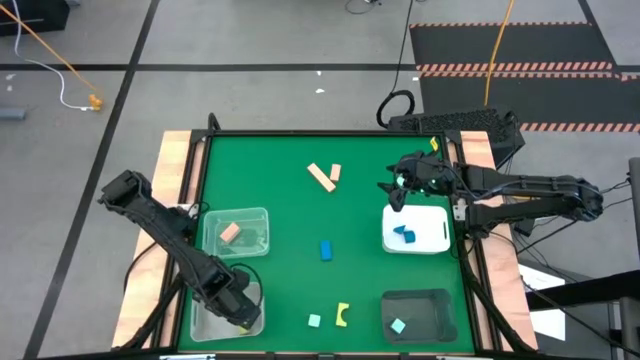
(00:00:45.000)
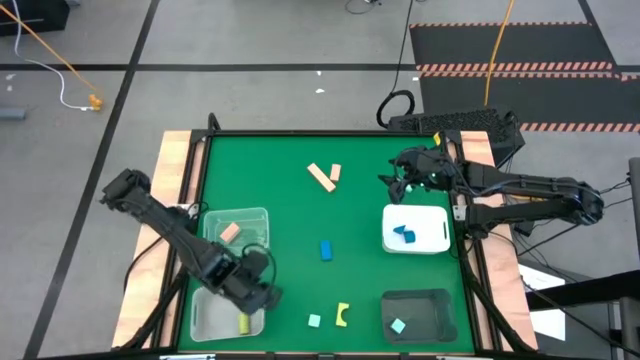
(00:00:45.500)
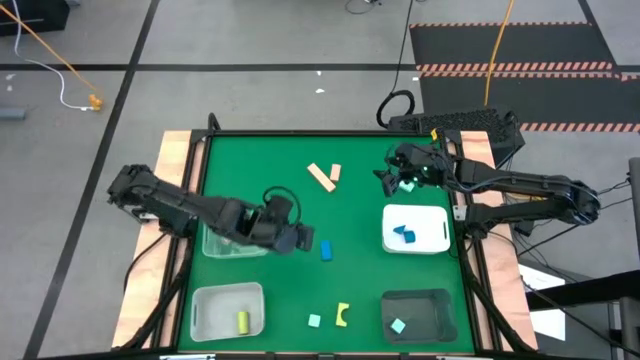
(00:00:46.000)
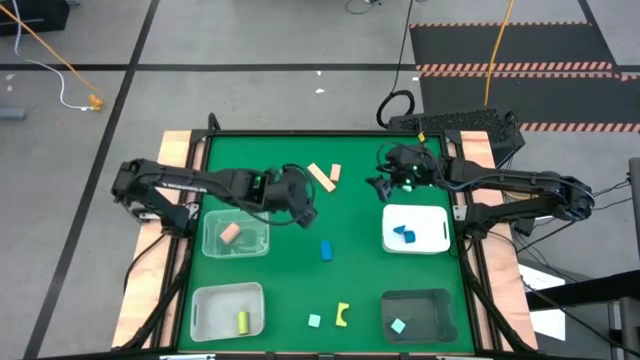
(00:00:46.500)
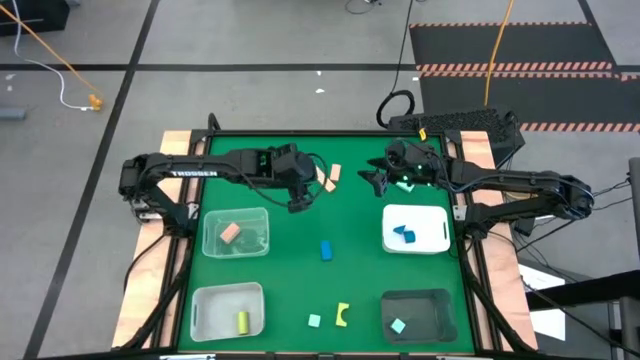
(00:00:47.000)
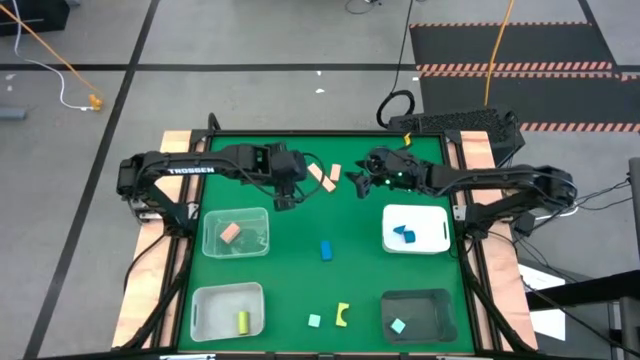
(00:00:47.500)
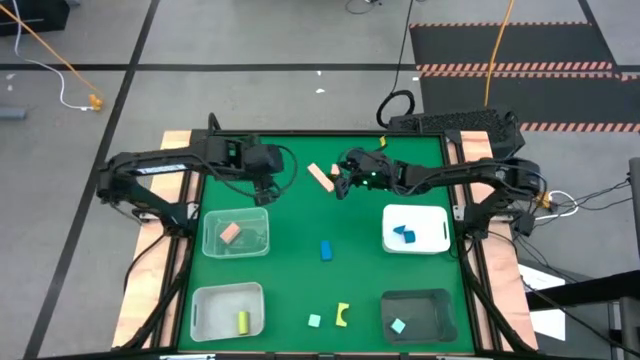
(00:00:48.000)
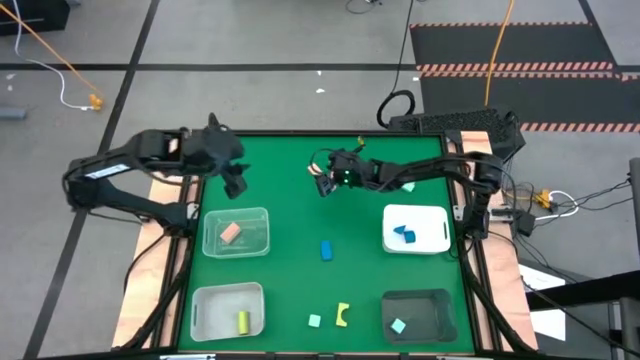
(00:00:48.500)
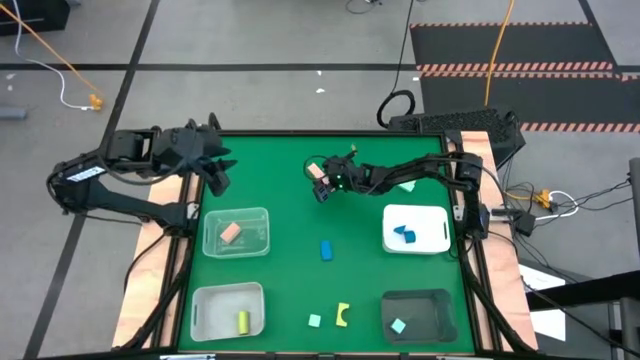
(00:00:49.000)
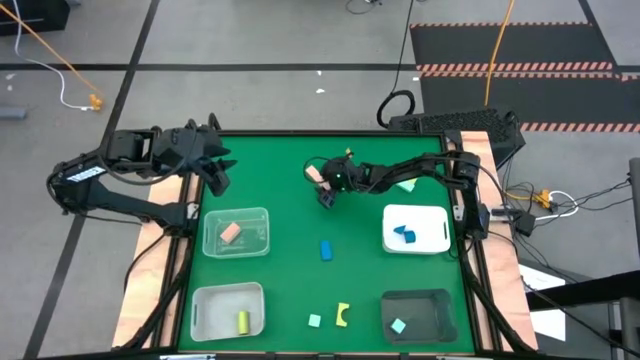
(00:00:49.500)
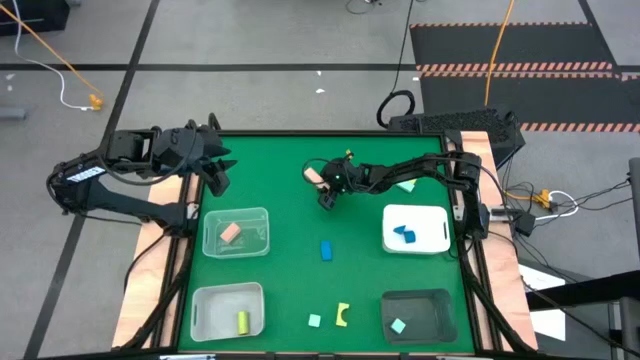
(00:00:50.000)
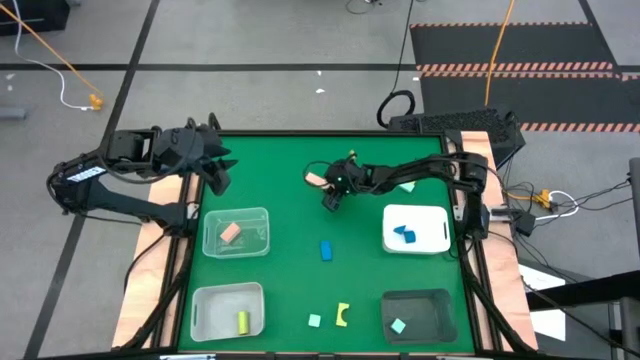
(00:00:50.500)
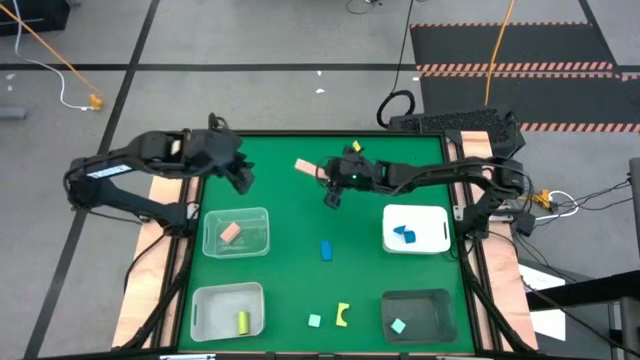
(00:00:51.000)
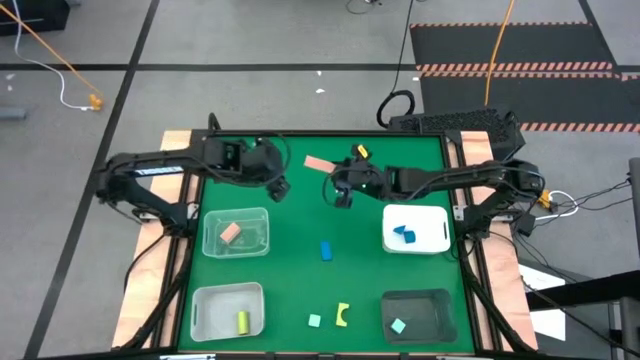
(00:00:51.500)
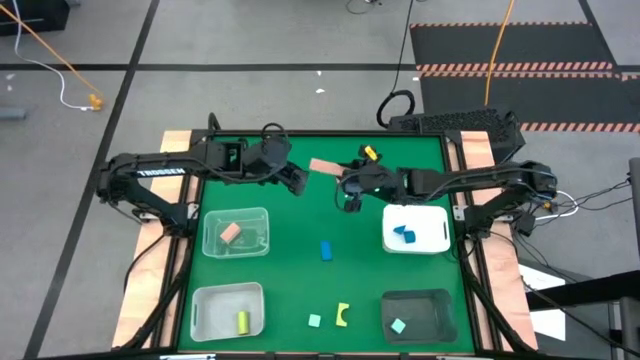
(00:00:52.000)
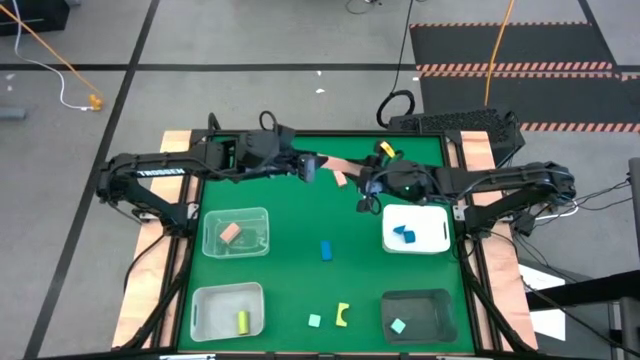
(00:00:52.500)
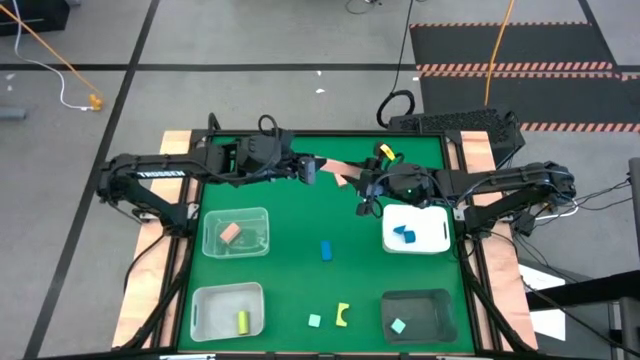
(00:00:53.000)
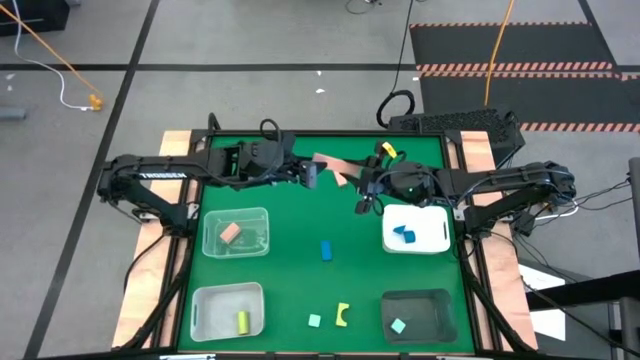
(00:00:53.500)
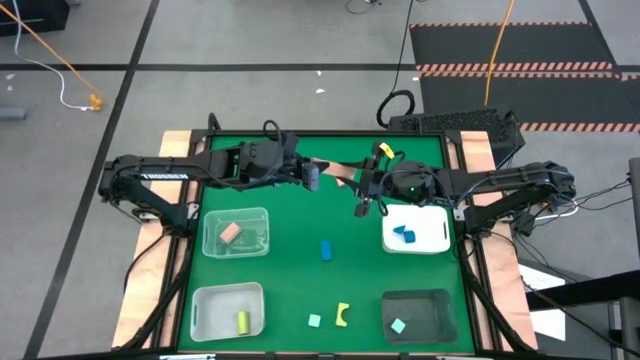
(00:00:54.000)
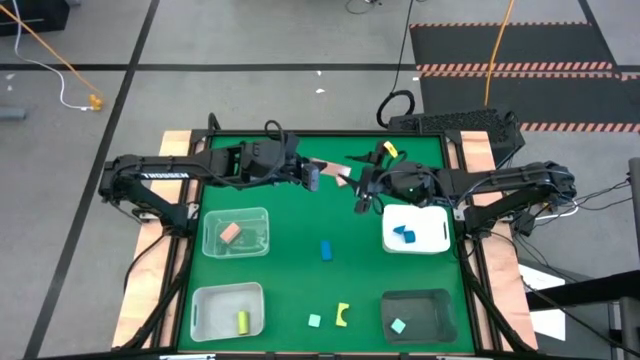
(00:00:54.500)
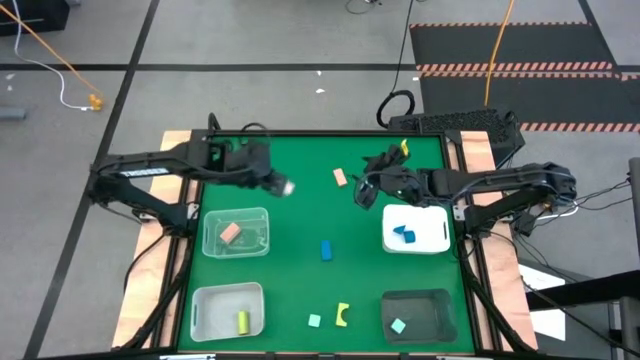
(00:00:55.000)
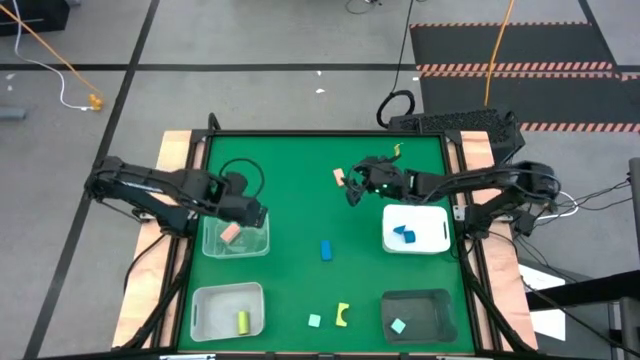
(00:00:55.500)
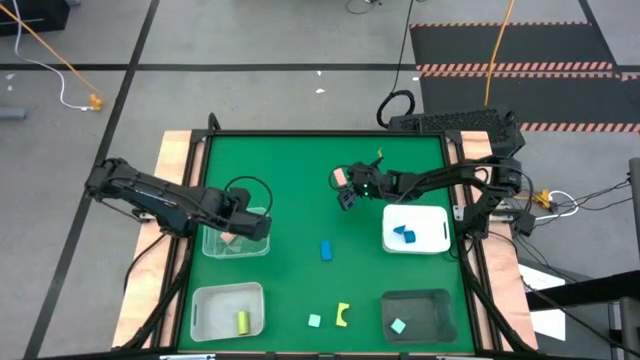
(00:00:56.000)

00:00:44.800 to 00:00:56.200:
Task: Sort & place blocks by color
Put the top middle brown block into the transparent bin

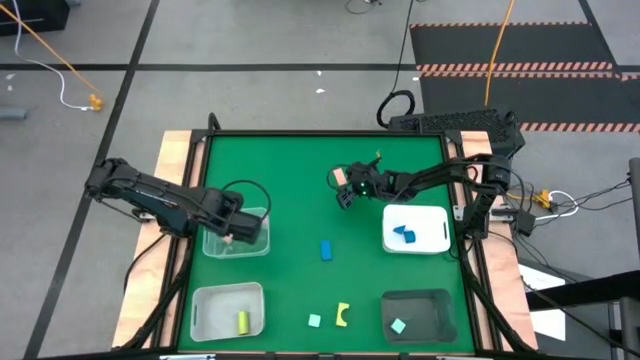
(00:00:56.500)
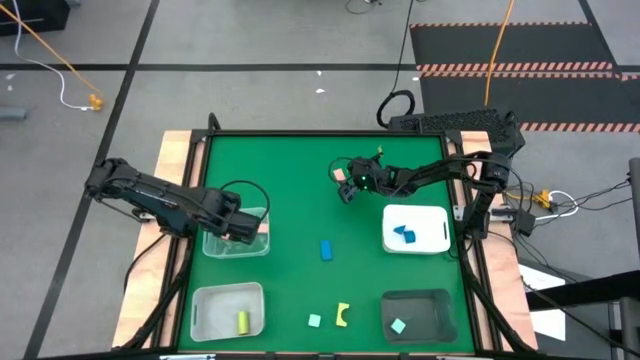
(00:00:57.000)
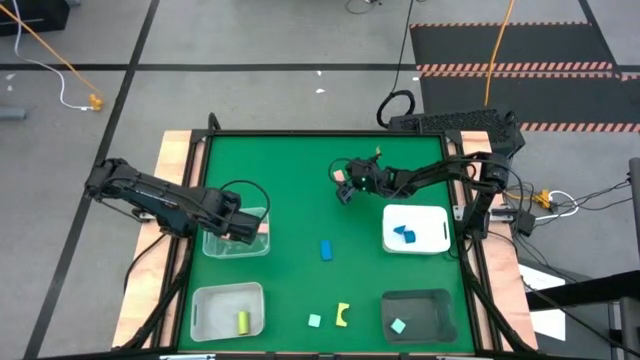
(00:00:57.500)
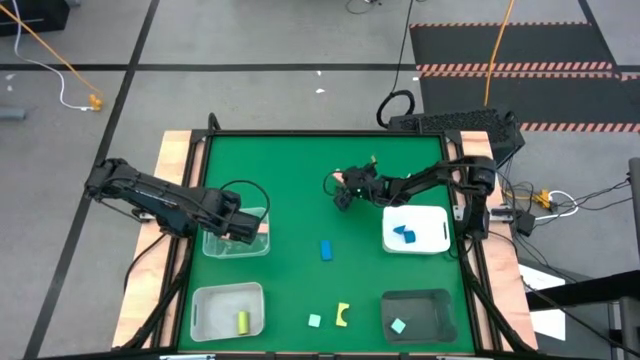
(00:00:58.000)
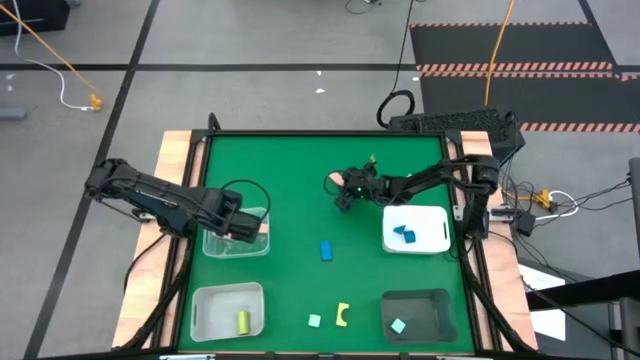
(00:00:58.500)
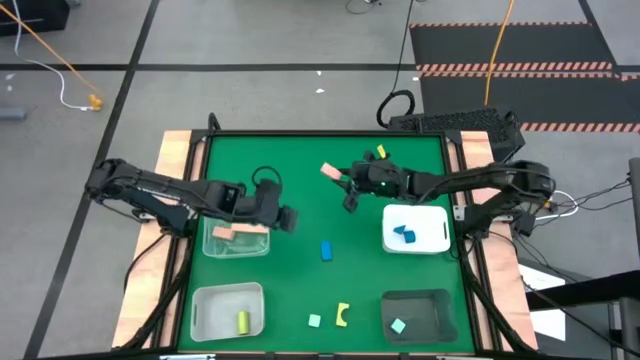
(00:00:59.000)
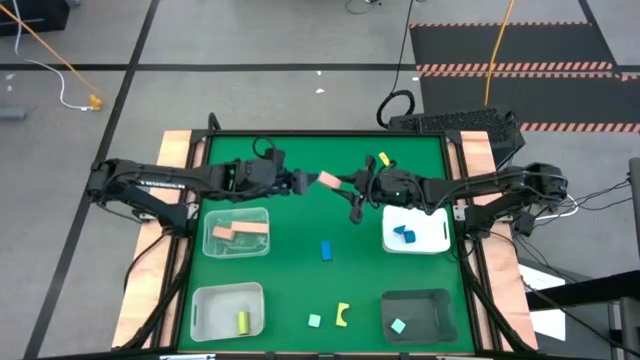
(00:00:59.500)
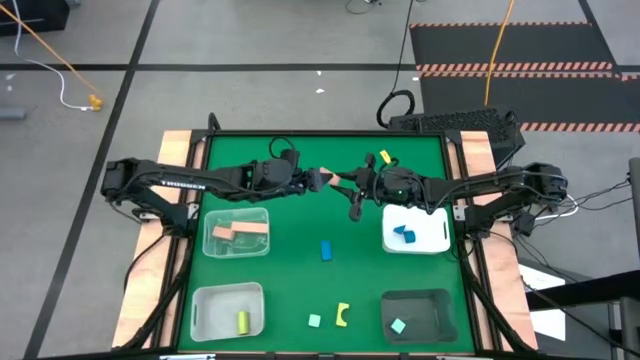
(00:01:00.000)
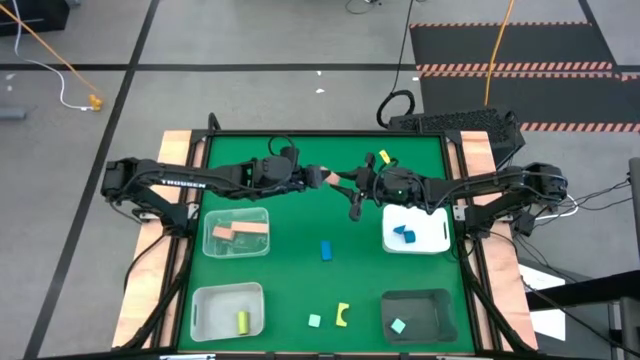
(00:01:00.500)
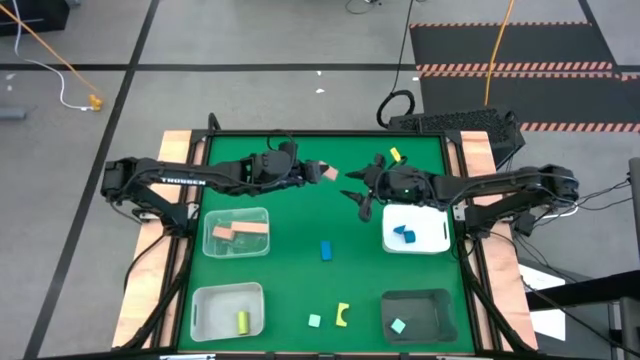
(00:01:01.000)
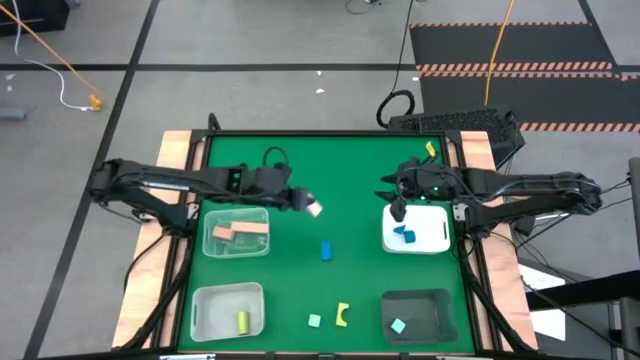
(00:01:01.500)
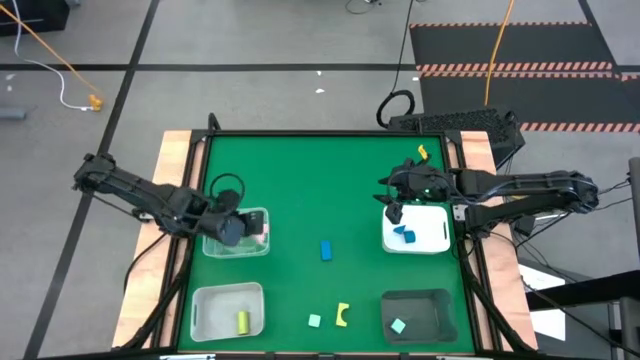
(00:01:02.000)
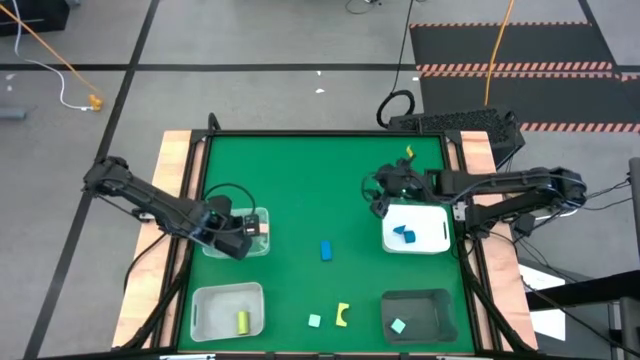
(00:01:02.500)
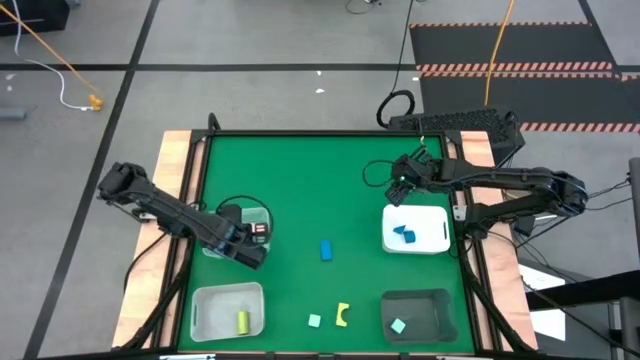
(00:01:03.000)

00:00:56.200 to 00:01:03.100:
Put the brown block into the transparent bin

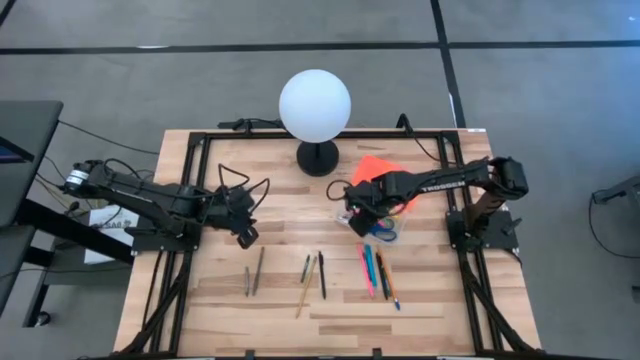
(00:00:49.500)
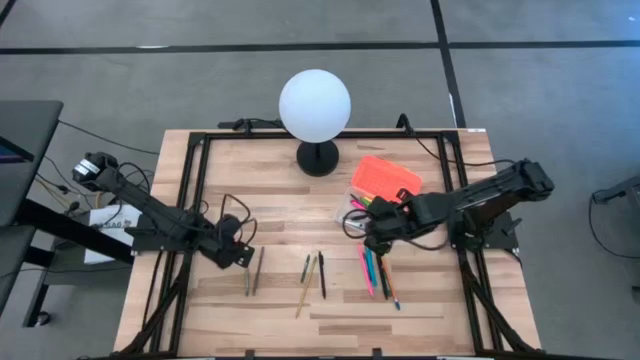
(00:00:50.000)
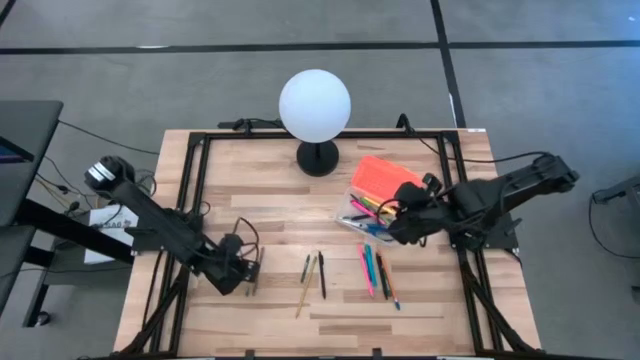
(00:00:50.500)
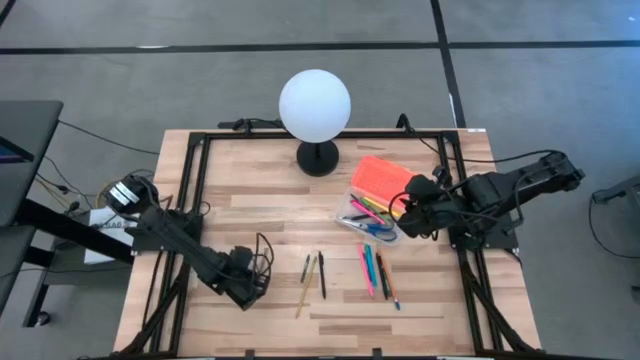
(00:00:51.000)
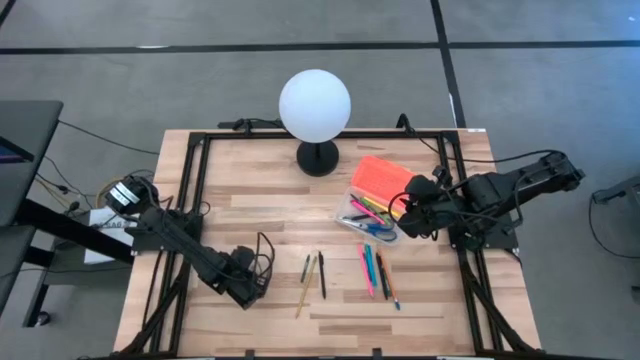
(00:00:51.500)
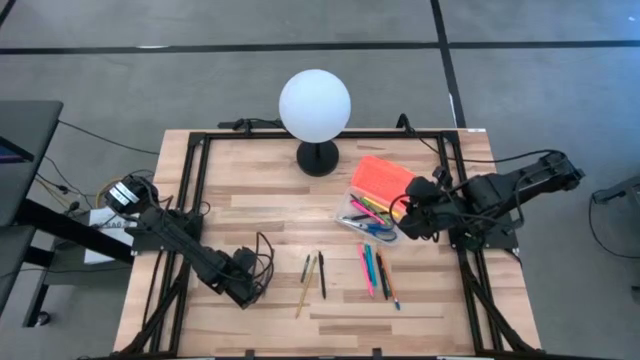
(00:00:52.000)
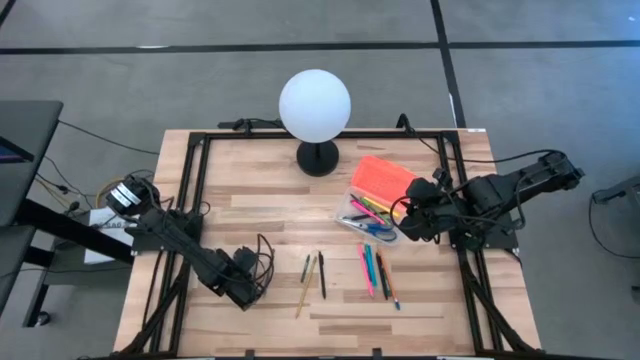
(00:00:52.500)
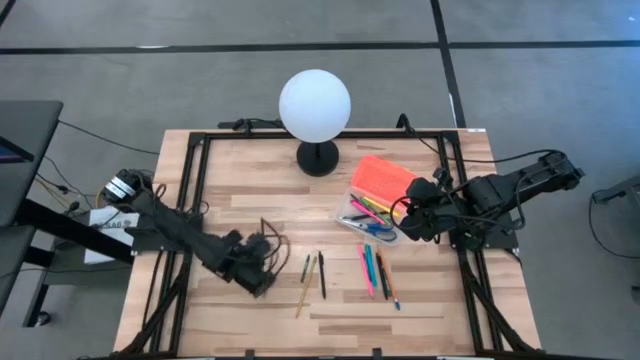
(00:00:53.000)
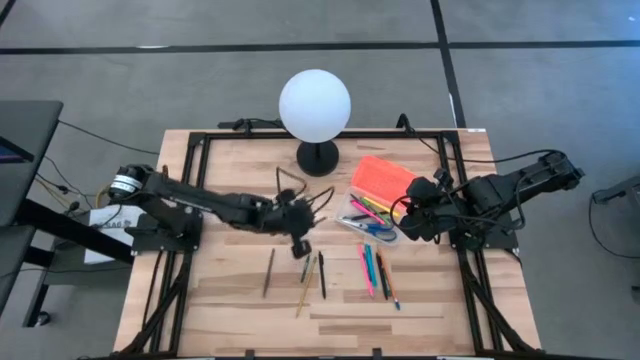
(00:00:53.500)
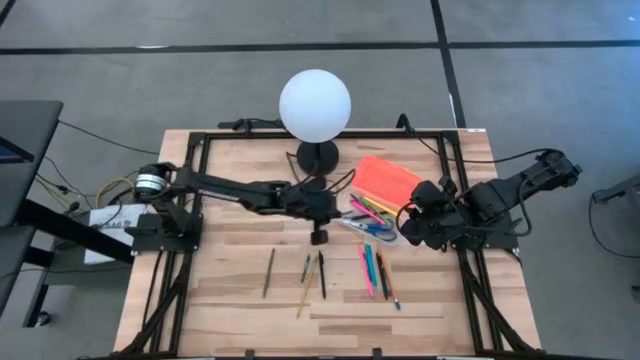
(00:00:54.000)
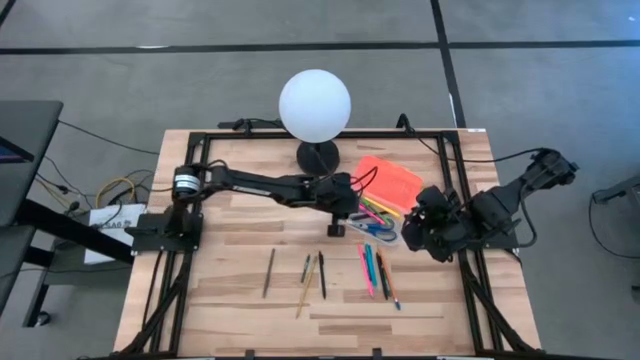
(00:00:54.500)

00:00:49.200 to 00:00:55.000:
Task: Pick & place school supplies into a supply box
Put the gray crayon into the orange supply box
